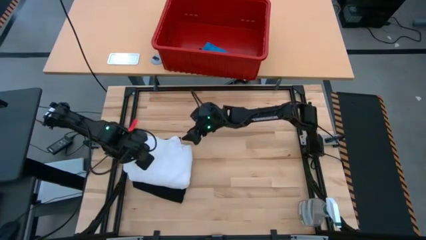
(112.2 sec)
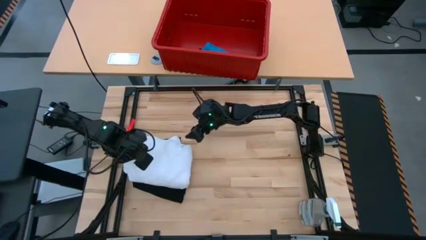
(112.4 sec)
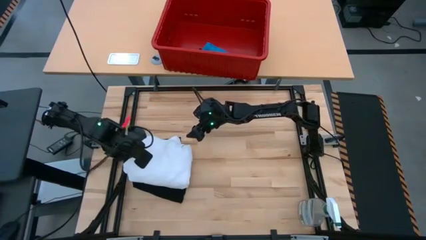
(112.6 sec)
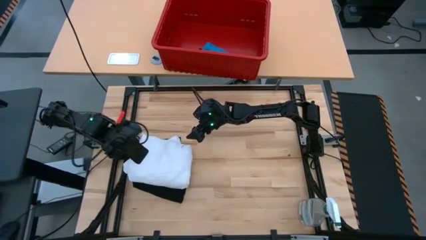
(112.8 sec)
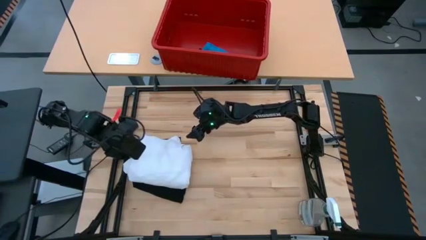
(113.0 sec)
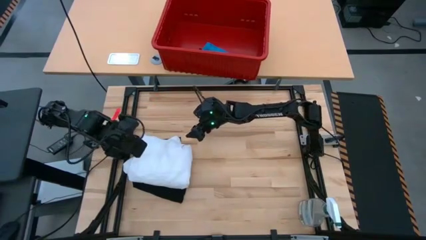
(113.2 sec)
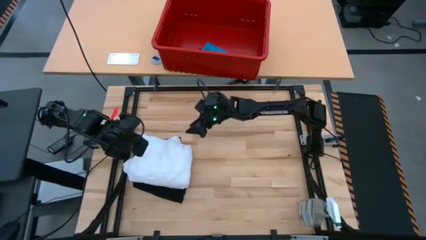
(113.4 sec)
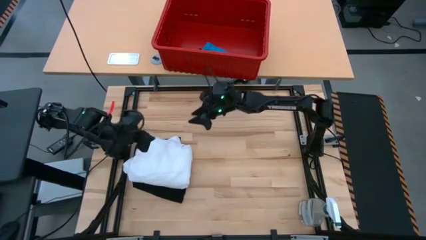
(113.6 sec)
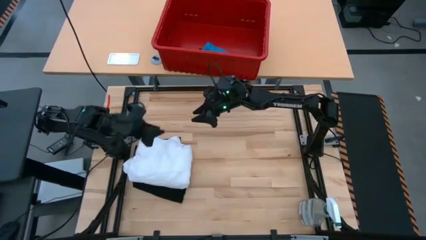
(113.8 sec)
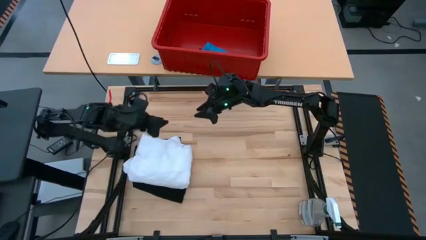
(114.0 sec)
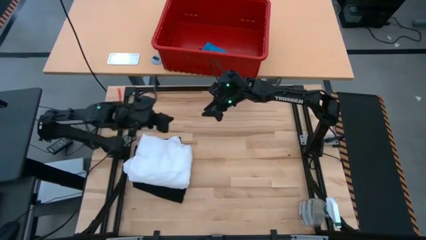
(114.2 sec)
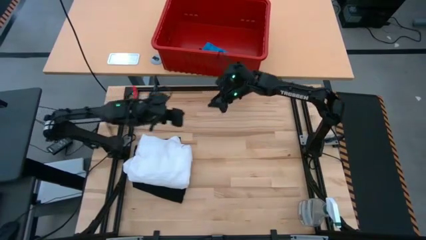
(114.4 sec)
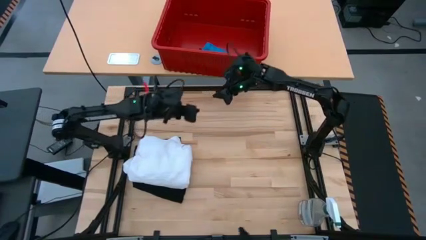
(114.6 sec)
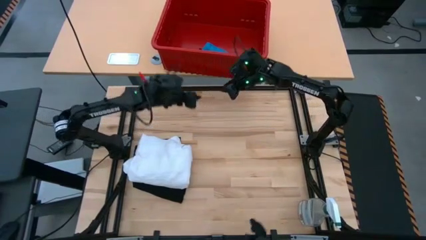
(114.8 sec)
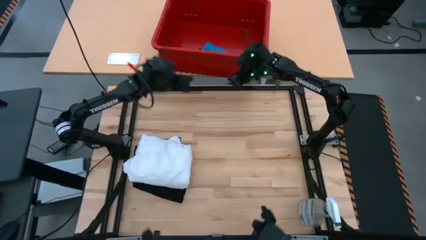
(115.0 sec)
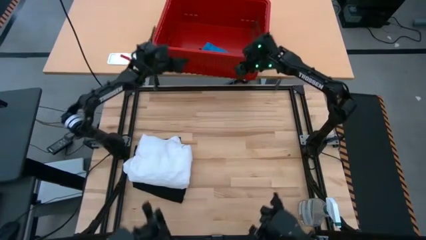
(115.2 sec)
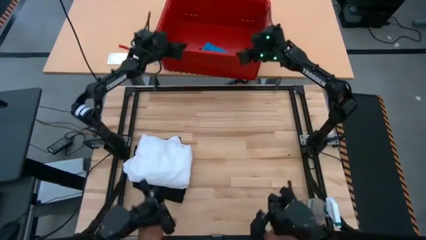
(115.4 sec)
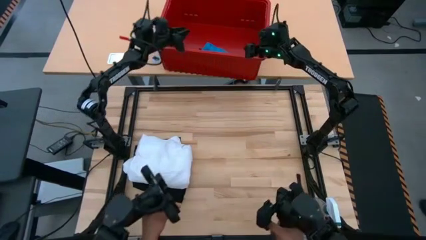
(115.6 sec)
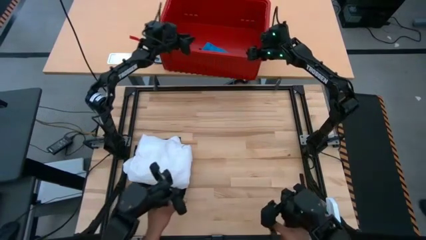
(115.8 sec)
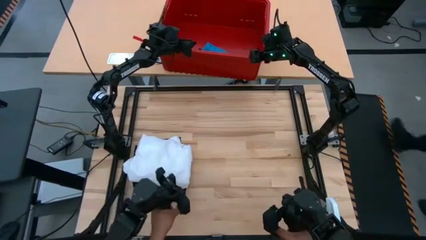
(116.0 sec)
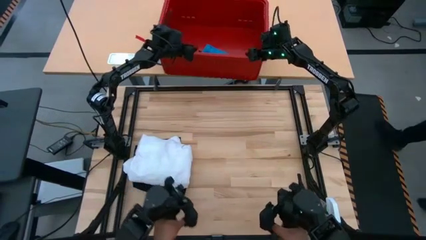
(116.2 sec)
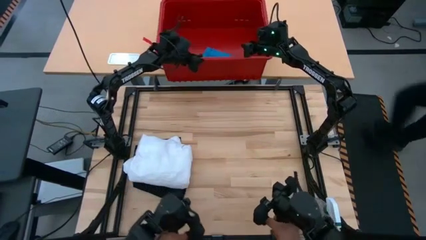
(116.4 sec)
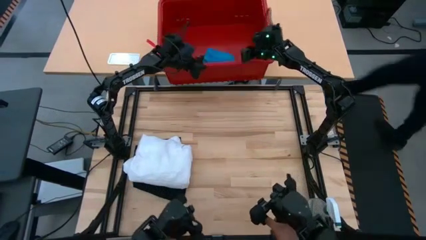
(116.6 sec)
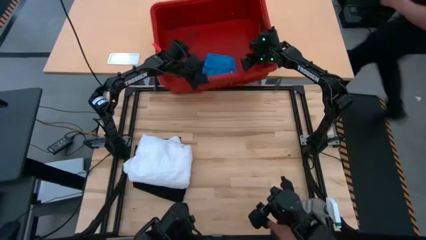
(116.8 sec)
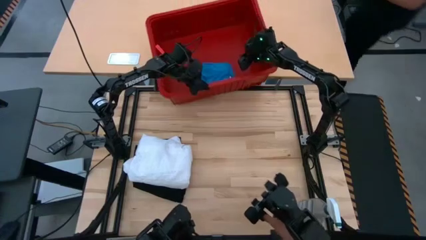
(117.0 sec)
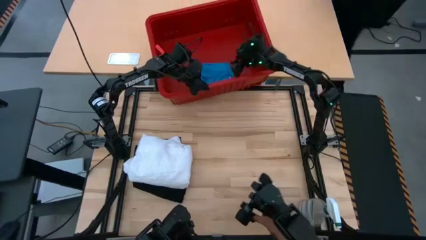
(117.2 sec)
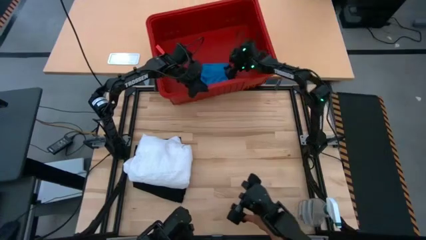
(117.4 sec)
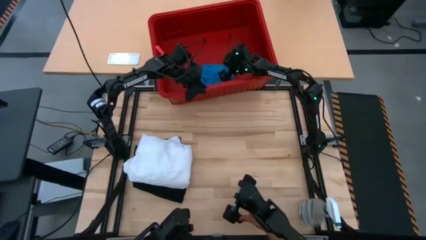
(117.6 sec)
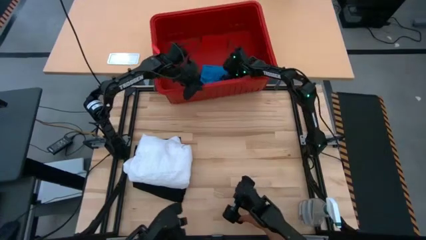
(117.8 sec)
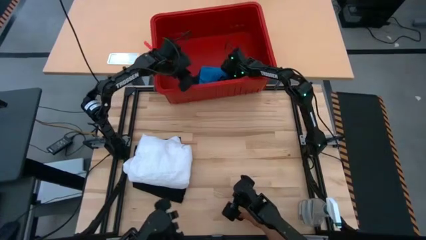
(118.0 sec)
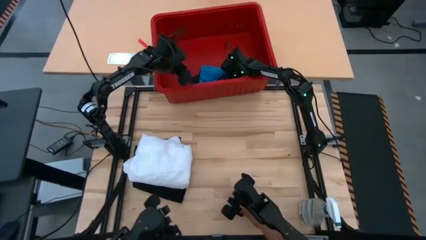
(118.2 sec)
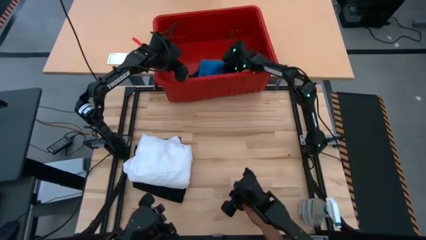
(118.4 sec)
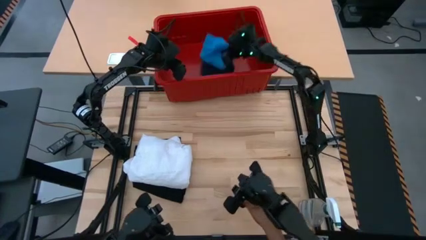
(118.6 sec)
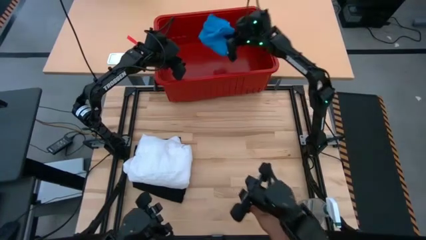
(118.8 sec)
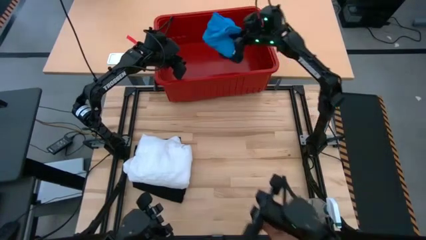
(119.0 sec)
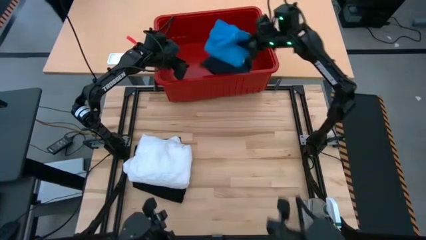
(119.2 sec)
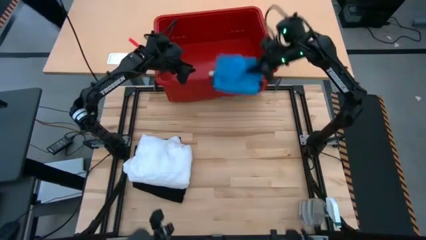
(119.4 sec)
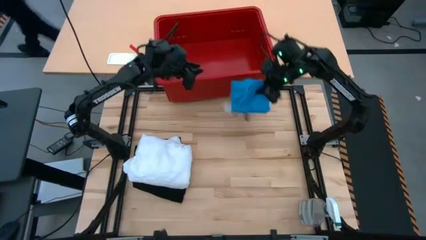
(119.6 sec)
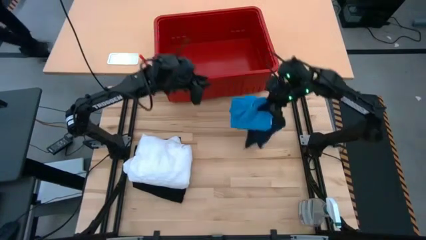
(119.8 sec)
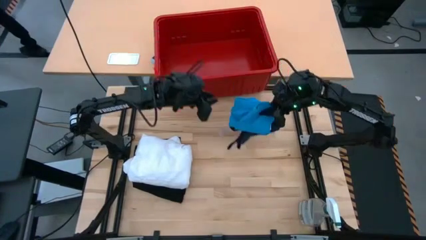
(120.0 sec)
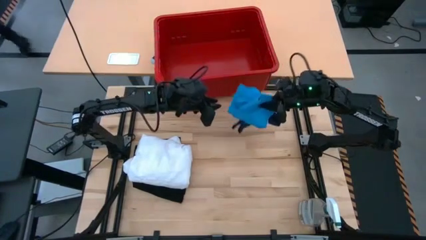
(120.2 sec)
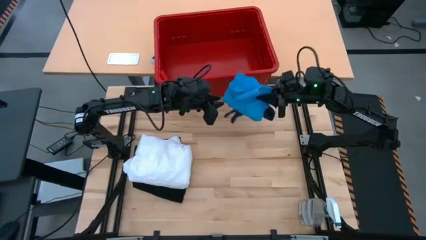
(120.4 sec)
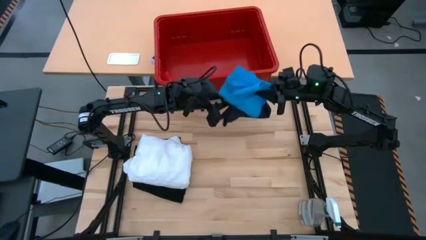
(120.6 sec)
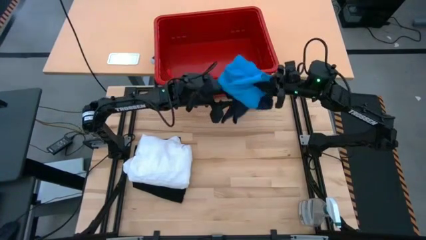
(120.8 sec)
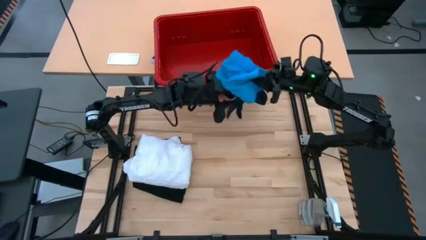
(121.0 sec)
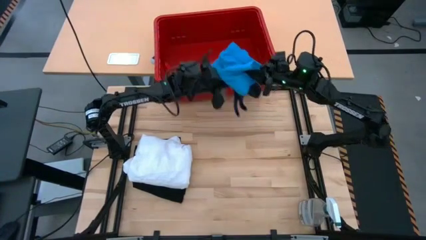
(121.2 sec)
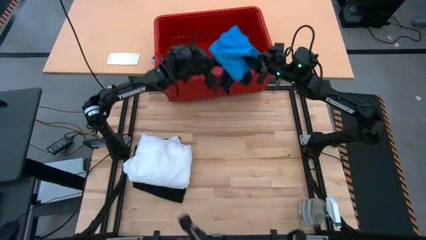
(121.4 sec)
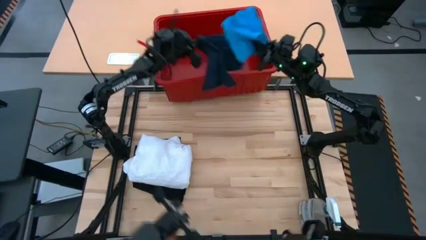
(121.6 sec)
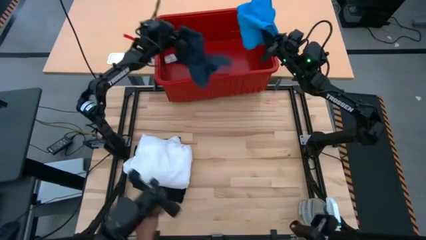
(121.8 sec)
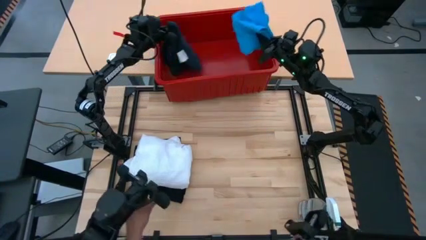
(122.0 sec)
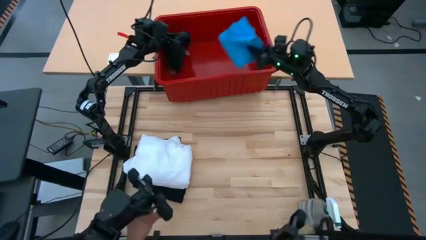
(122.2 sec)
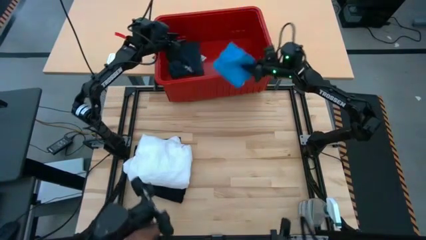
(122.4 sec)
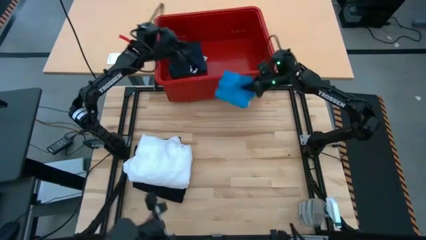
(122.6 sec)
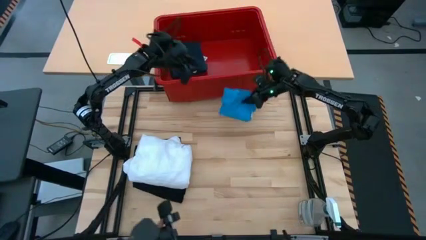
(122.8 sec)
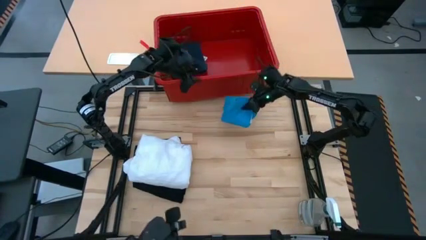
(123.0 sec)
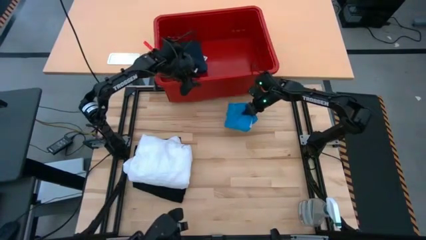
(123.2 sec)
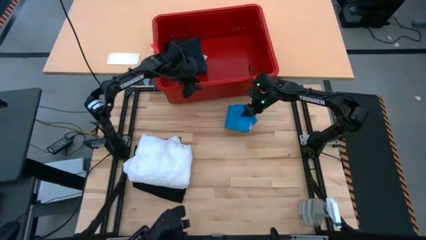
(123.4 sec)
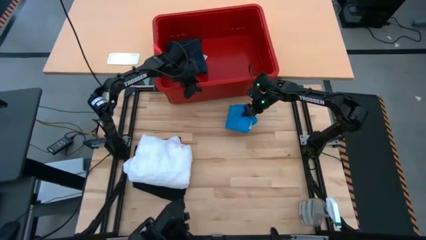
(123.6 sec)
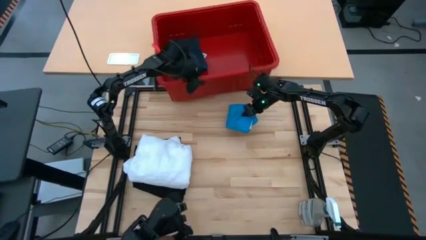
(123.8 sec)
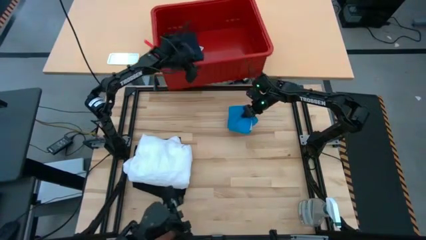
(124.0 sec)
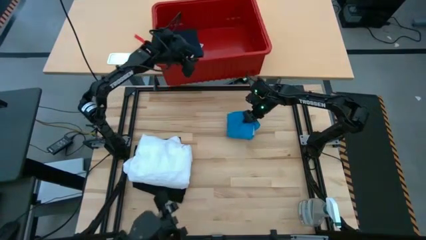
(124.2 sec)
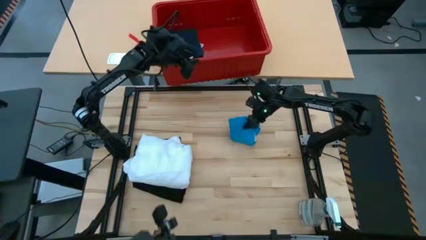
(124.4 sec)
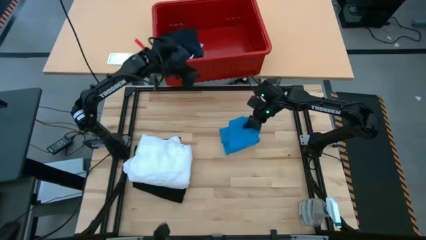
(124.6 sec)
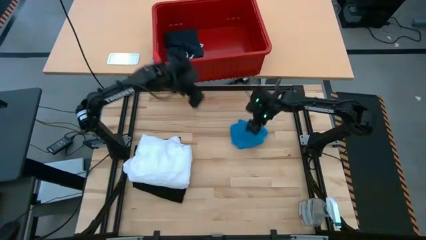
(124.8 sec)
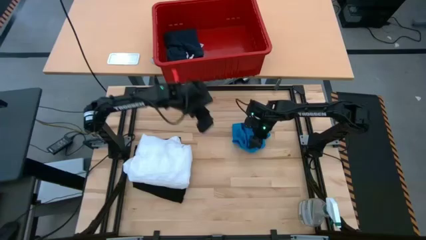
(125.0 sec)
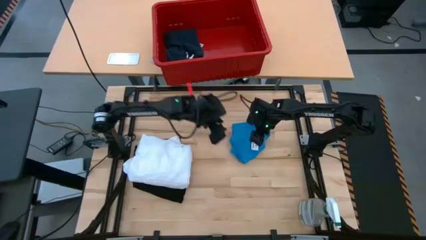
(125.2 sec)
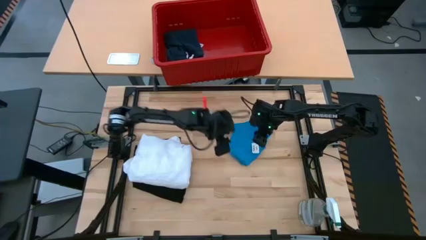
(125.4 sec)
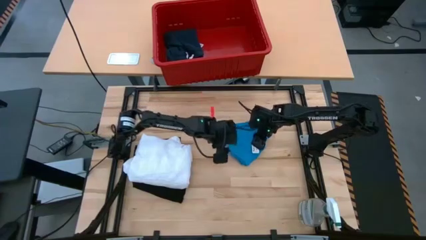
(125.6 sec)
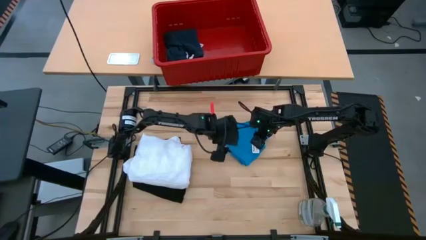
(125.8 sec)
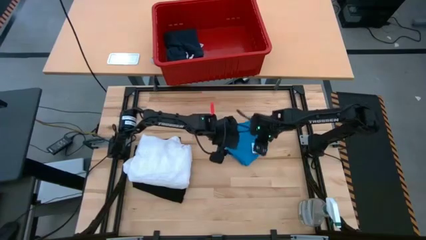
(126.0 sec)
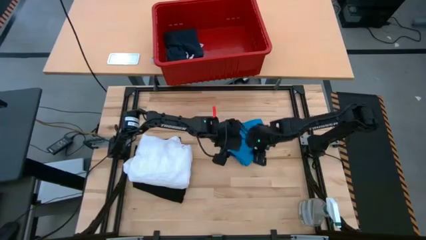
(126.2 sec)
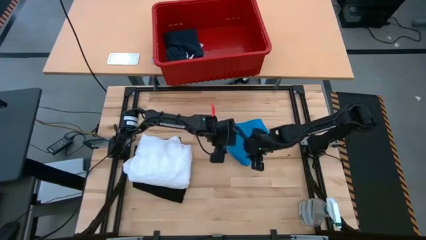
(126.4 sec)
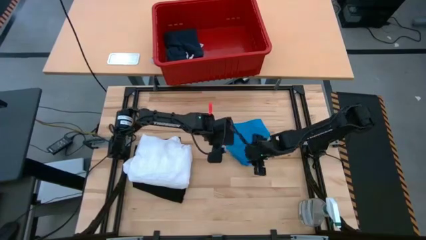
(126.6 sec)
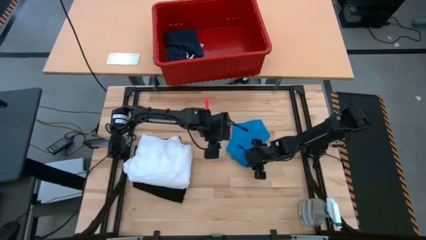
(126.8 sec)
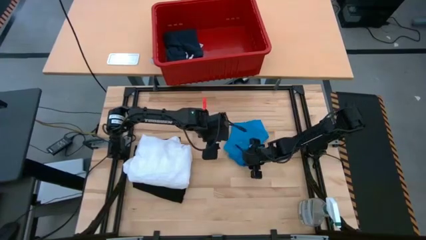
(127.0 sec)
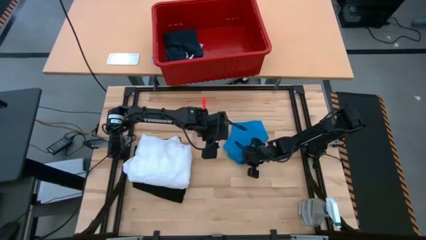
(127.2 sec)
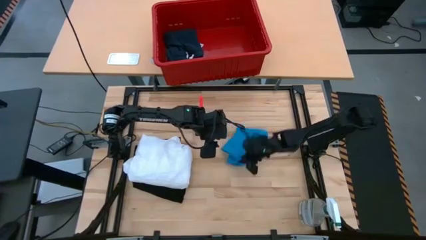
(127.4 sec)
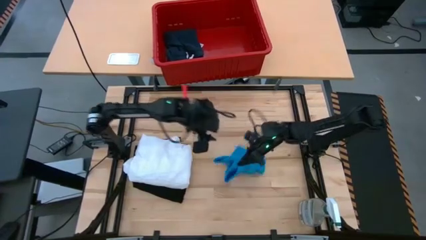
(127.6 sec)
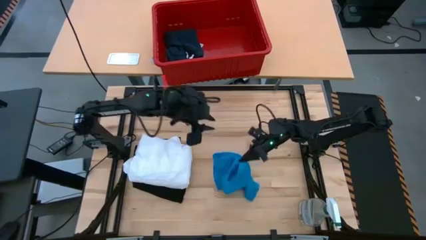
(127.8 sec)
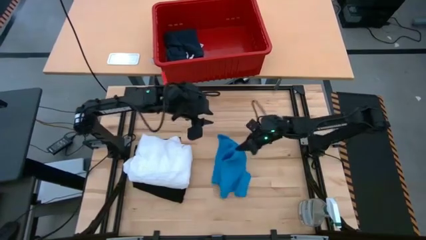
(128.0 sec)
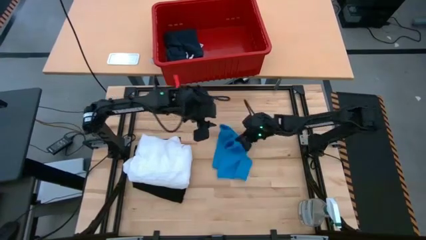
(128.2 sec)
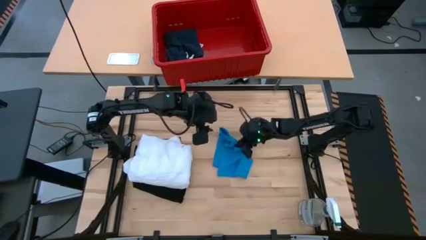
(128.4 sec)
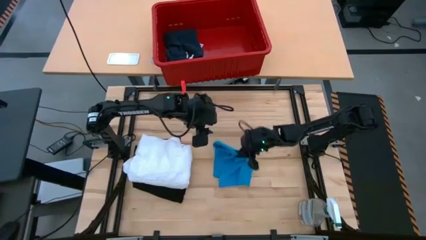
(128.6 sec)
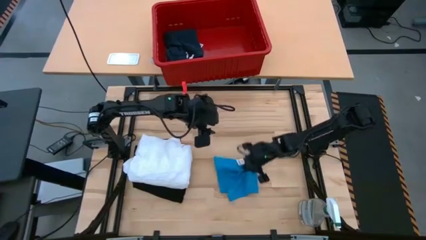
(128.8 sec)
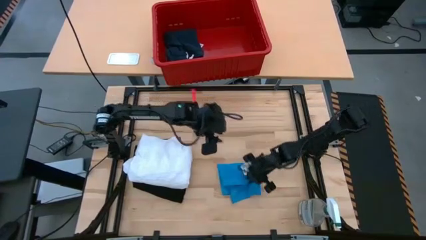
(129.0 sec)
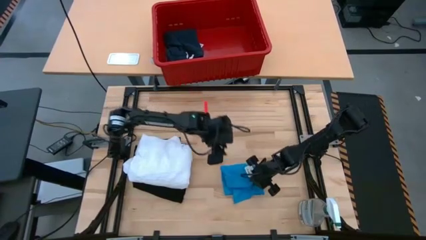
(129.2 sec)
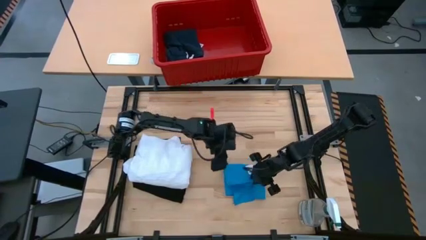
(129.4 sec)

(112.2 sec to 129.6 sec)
Task: Fold laundry
Fold the blue short
